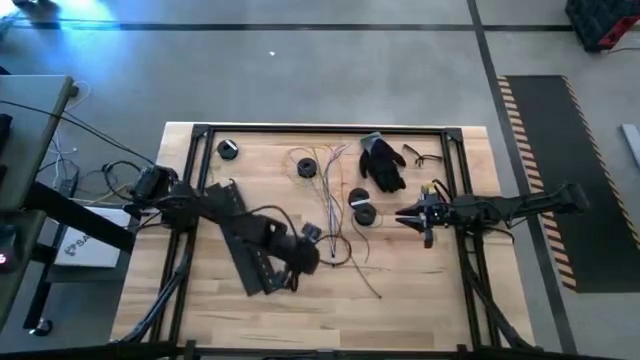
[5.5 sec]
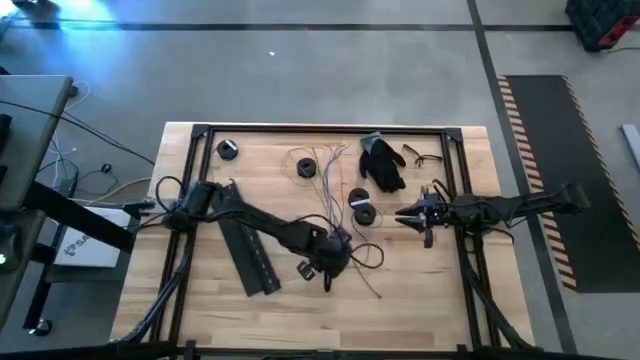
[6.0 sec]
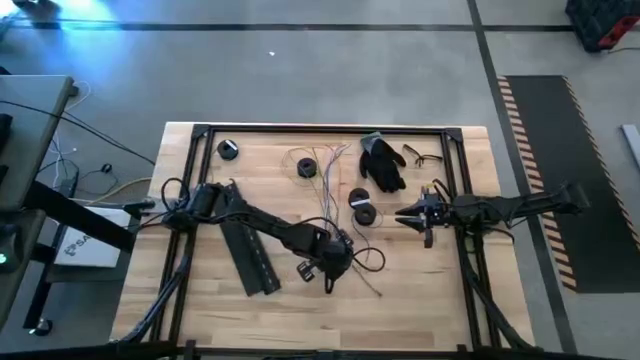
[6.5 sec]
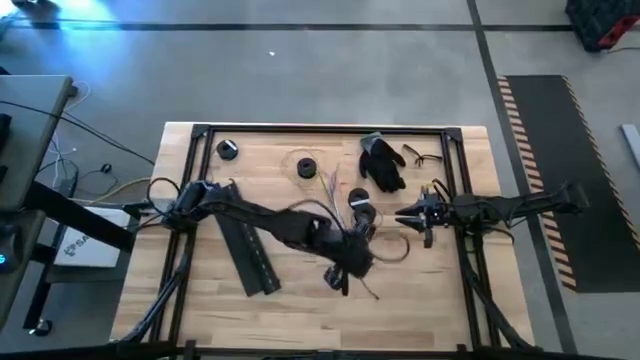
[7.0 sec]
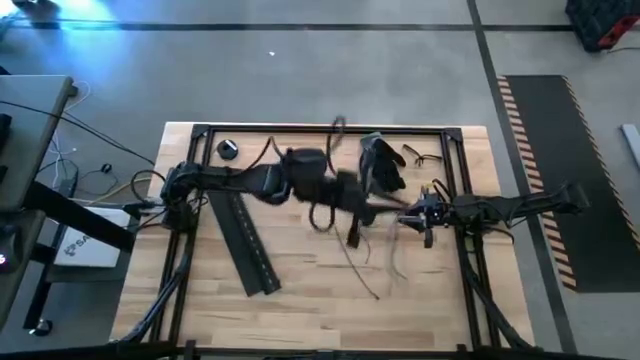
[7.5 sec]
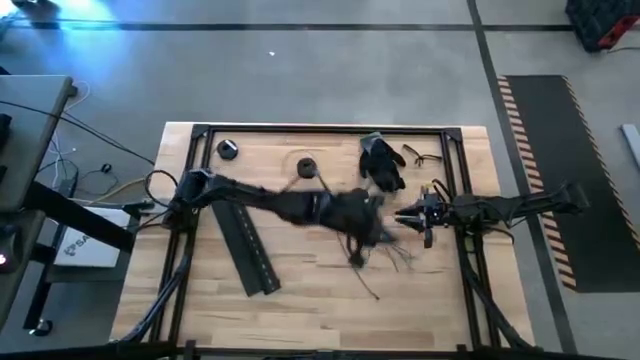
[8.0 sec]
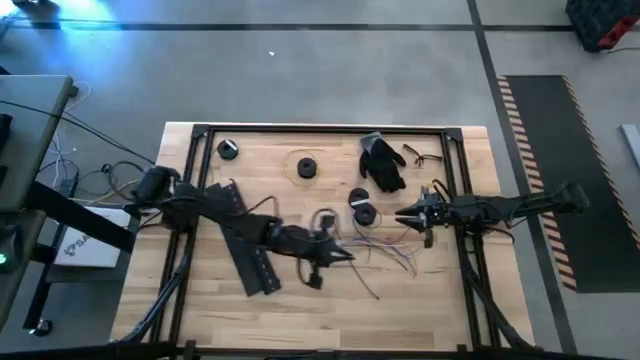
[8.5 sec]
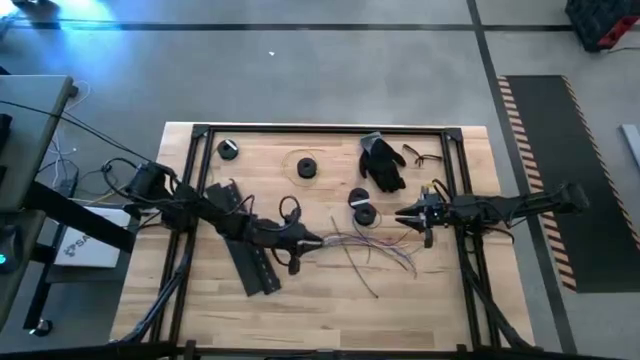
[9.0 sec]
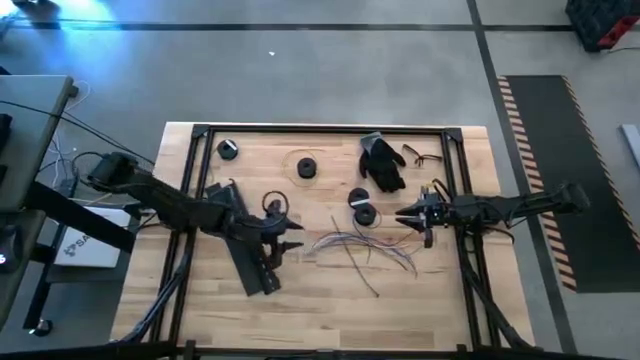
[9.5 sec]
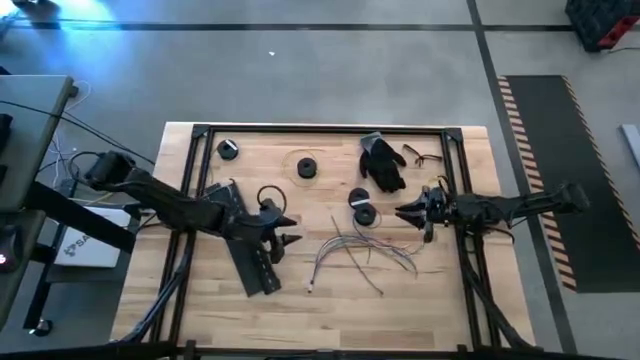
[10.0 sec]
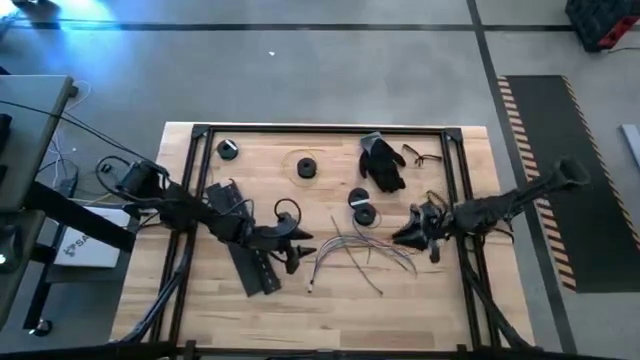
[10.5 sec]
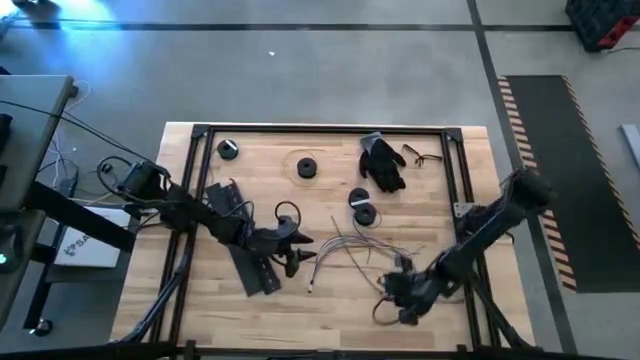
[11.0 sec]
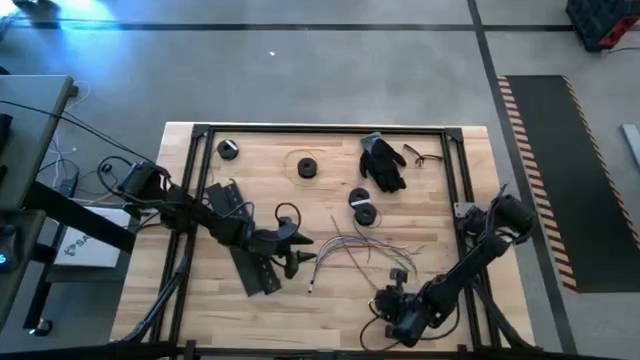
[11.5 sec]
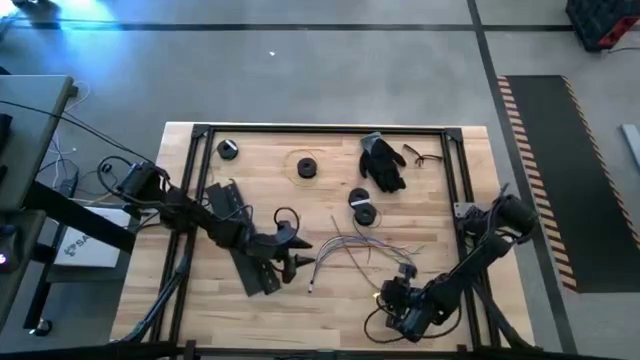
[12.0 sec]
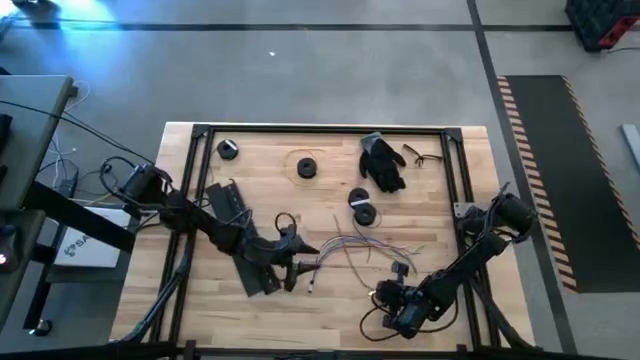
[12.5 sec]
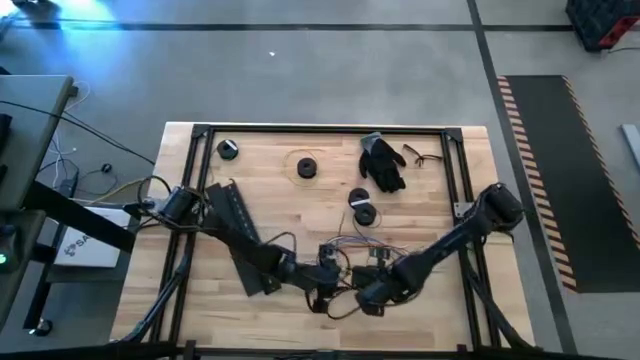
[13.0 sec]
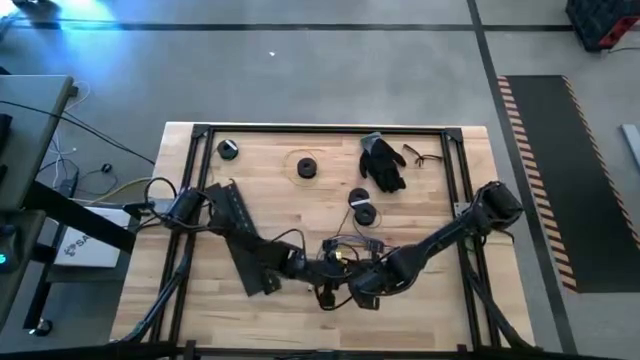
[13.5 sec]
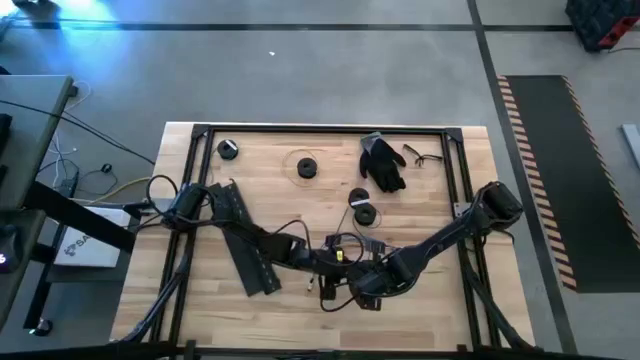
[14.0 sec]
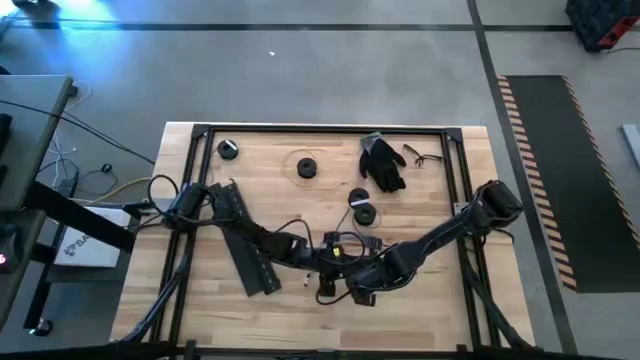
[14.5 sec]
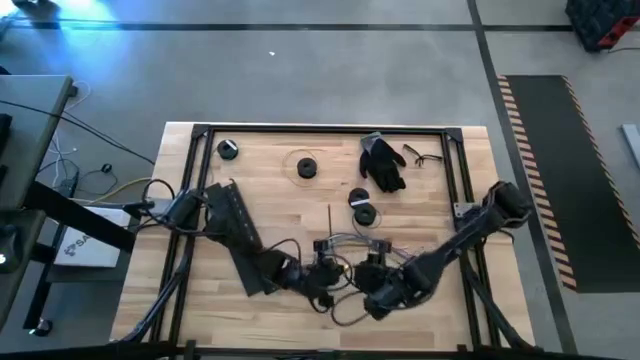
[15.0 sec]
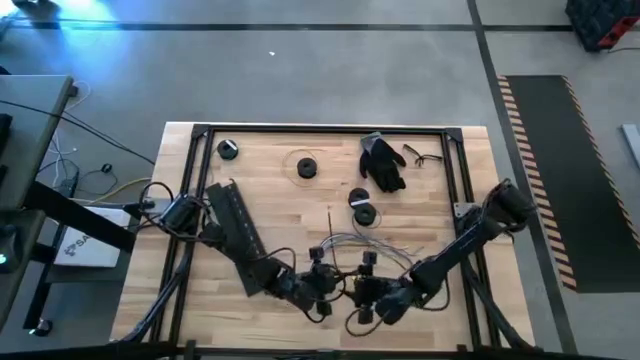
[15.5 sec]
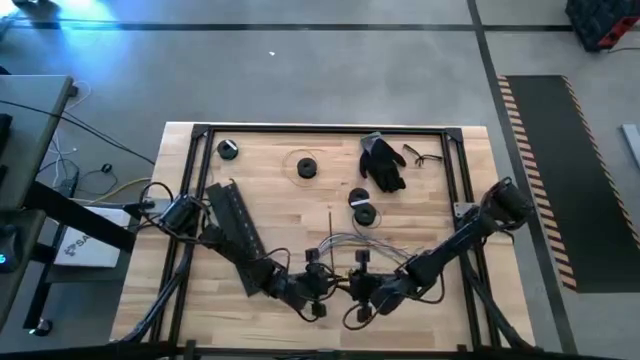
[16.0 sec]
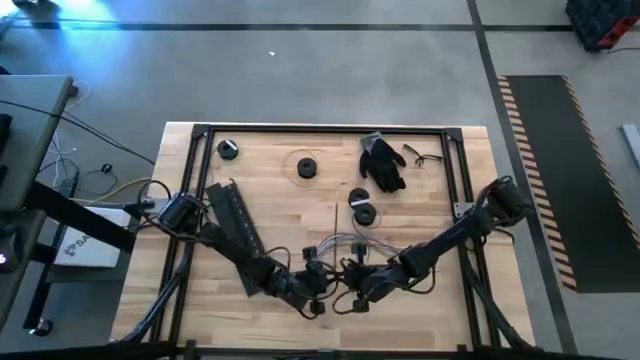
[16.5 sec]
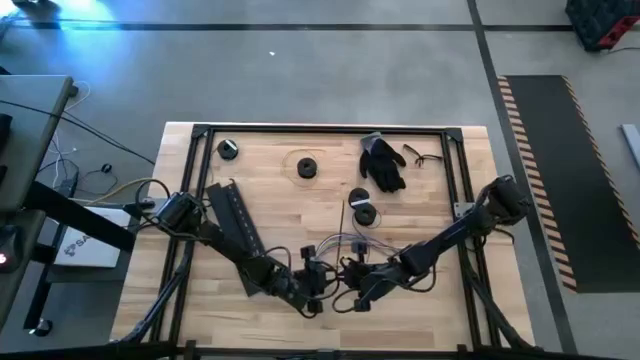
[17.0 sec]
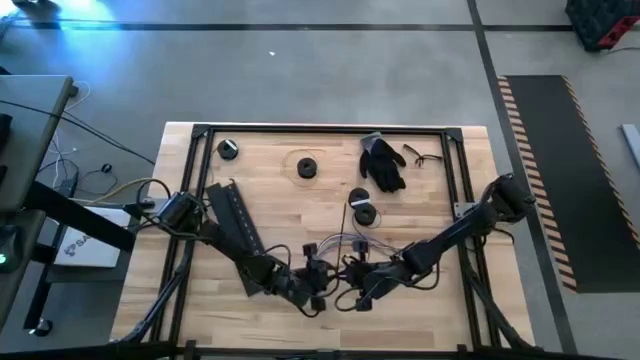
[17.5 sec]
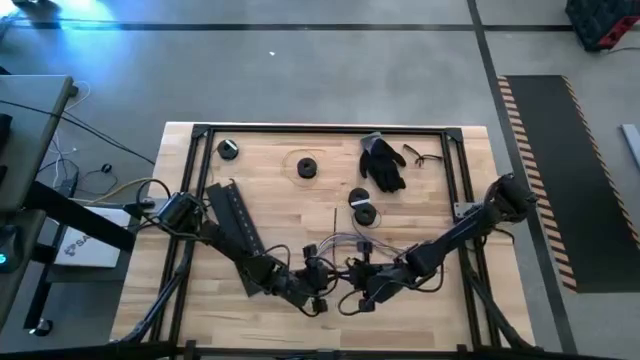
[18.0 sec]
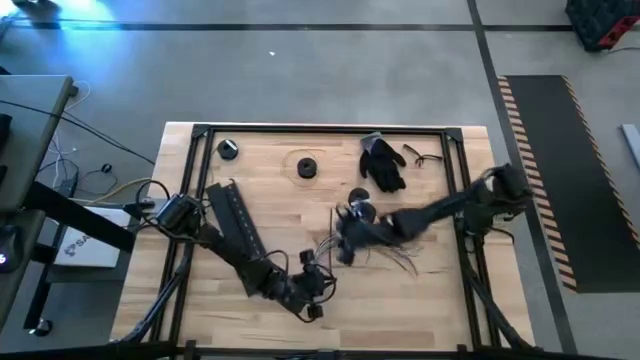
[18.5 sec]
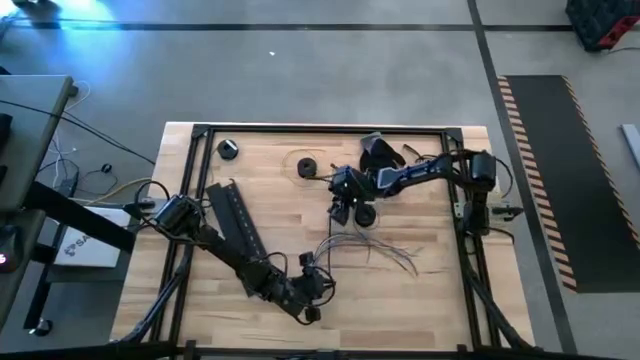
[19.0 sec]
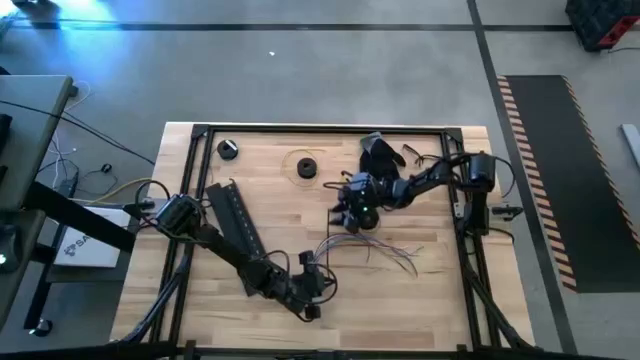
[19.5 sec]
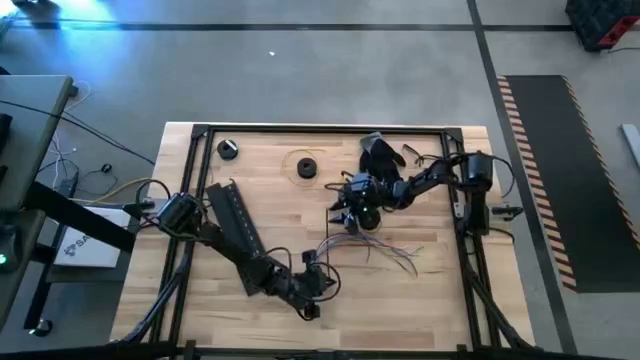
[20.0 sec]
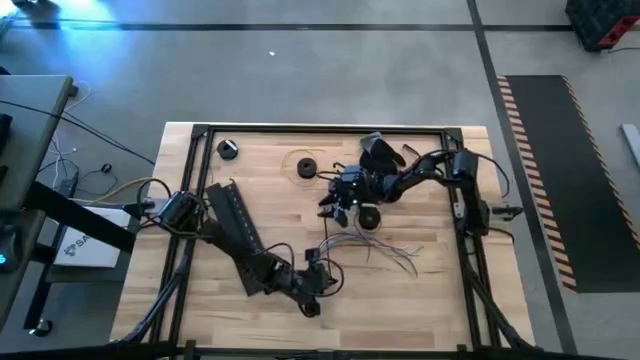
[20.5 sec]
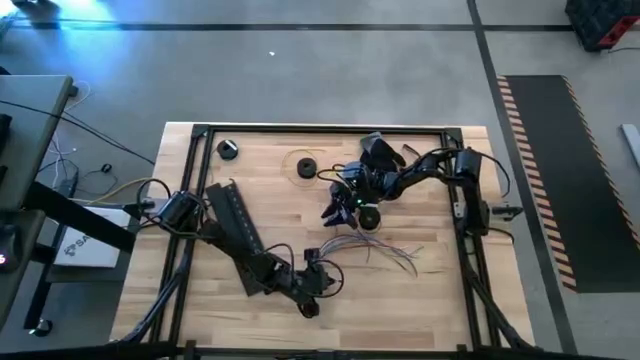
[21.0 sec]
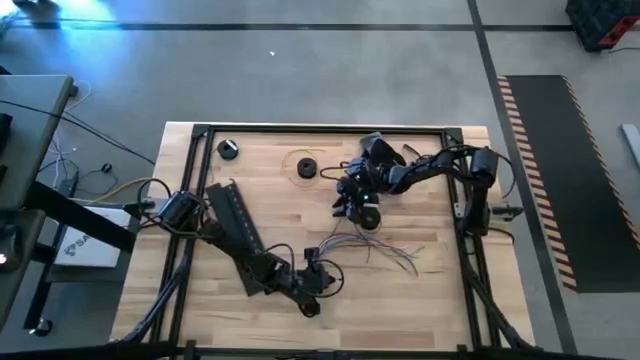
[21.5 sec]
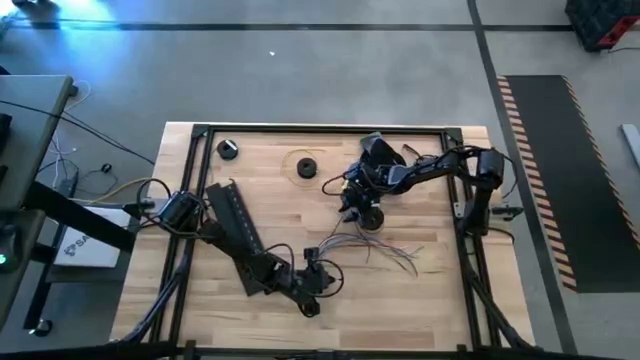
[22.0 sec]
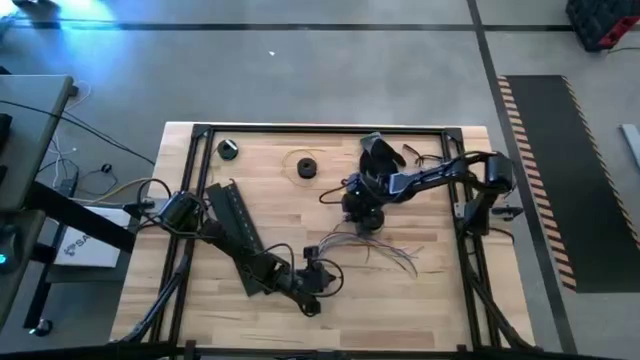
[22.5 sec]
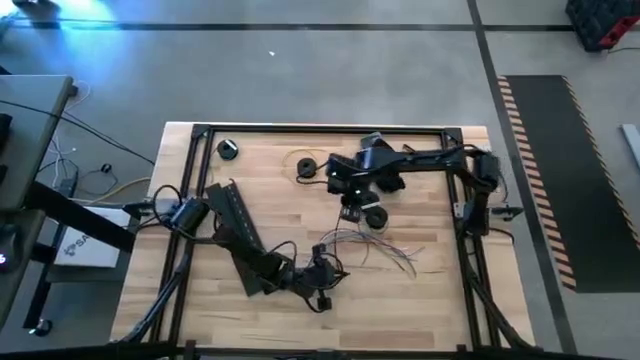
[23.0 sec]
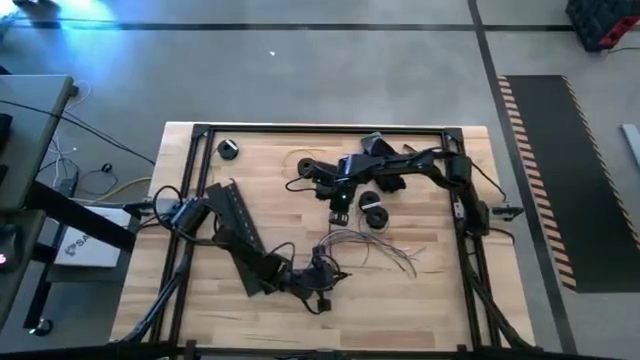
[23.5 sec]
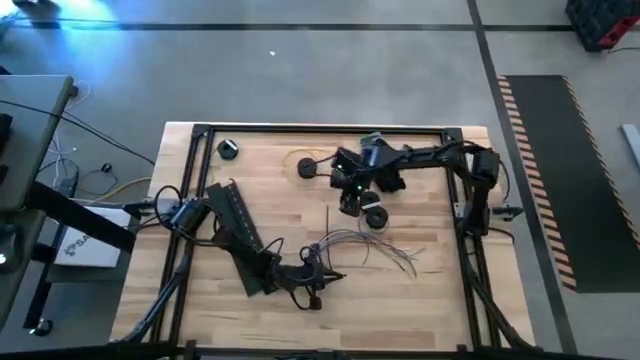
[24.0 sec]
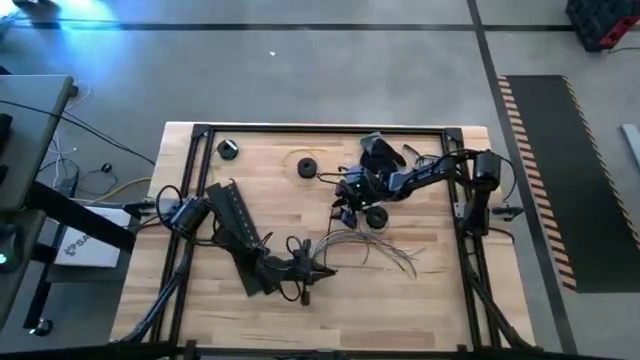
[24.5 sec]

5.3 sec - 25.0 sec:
Task: Ziptie cables
Wrap the cables together using a black zip tie
